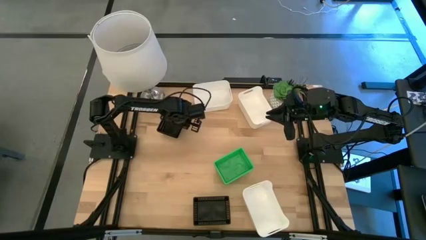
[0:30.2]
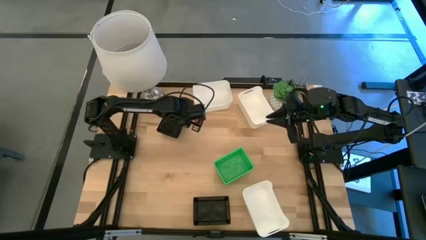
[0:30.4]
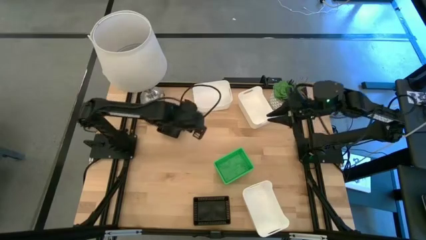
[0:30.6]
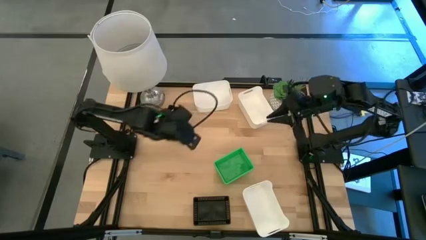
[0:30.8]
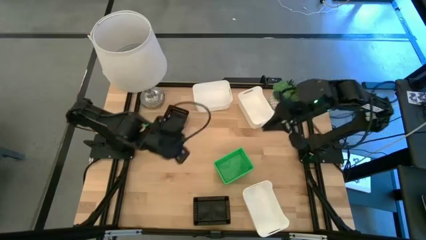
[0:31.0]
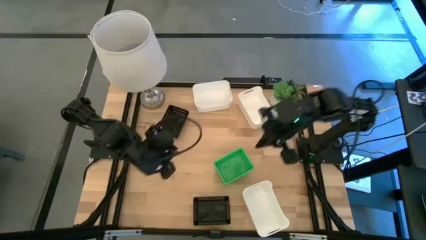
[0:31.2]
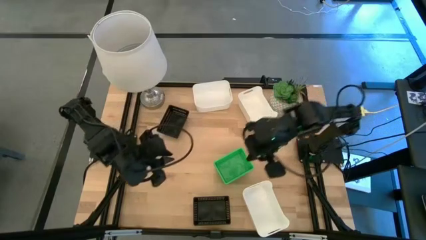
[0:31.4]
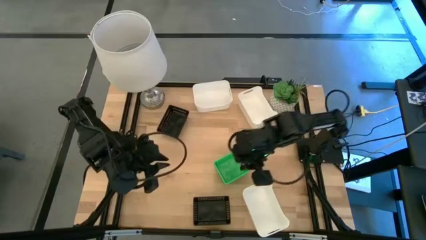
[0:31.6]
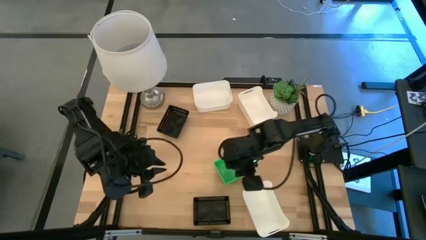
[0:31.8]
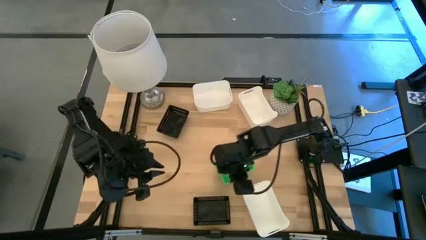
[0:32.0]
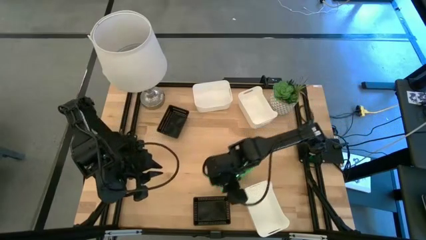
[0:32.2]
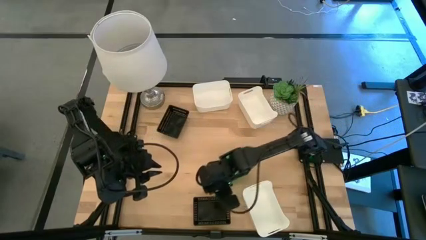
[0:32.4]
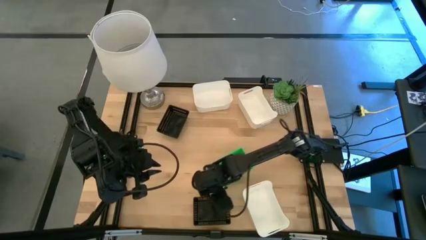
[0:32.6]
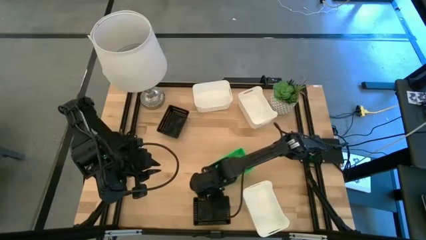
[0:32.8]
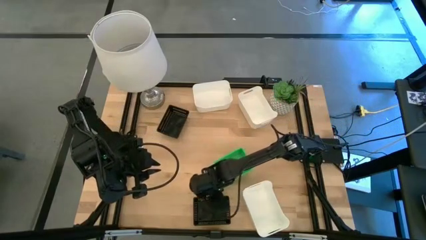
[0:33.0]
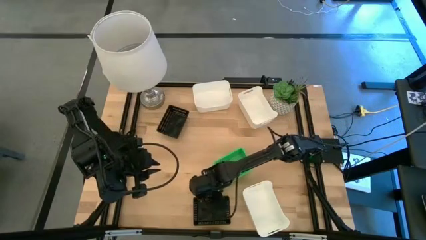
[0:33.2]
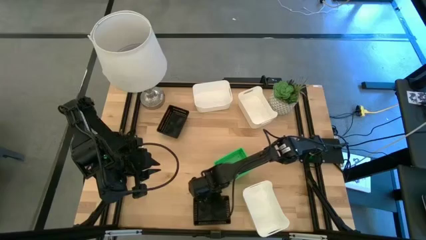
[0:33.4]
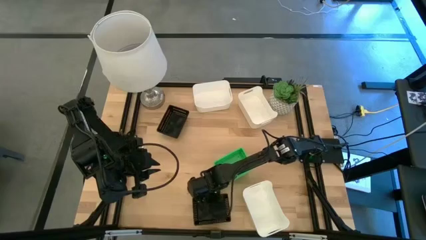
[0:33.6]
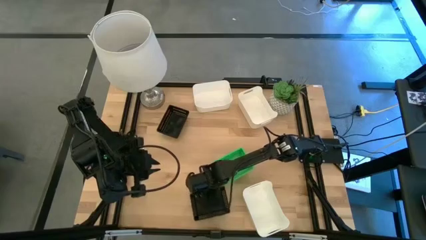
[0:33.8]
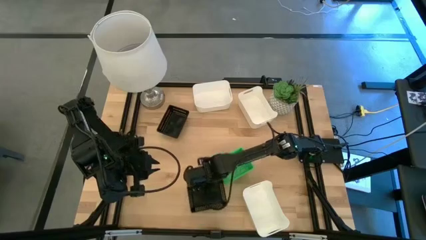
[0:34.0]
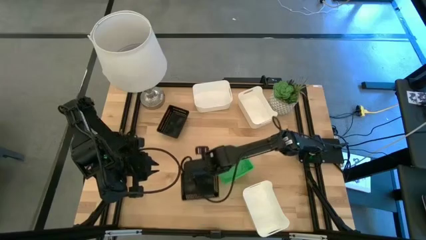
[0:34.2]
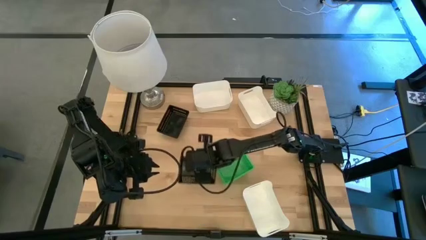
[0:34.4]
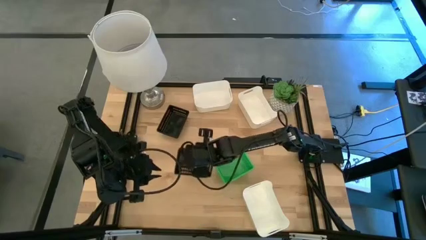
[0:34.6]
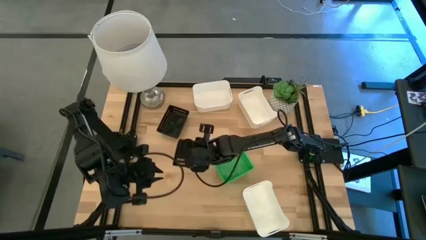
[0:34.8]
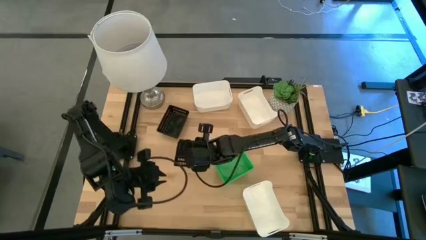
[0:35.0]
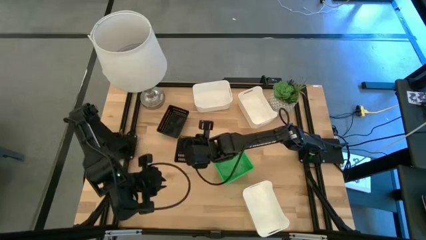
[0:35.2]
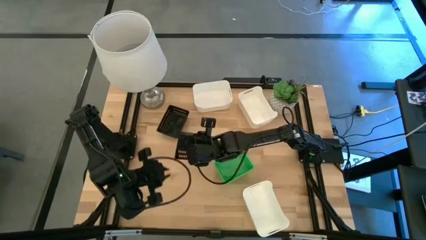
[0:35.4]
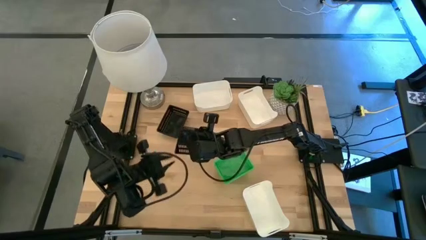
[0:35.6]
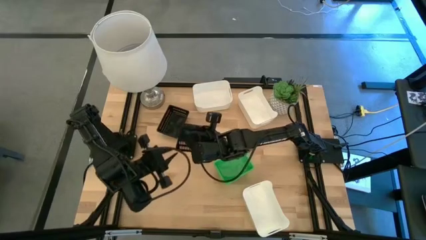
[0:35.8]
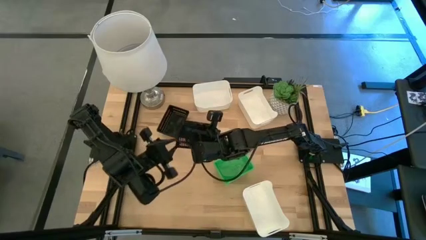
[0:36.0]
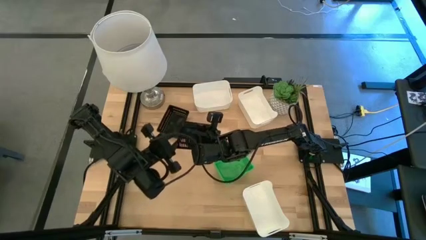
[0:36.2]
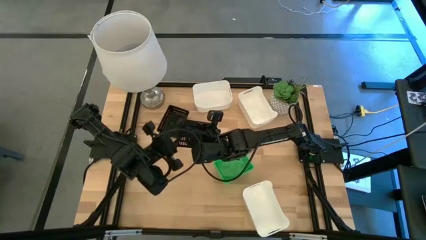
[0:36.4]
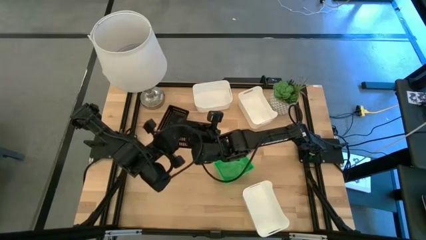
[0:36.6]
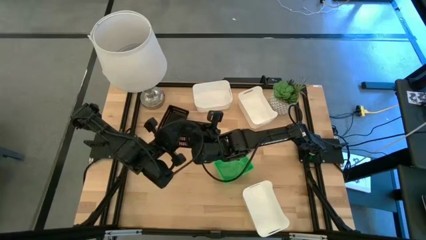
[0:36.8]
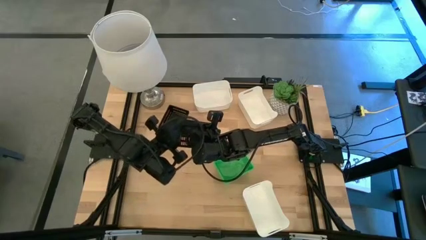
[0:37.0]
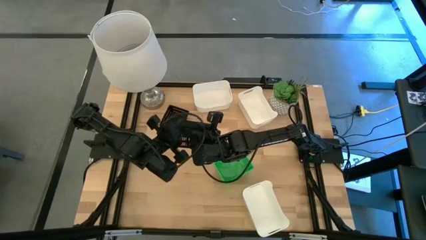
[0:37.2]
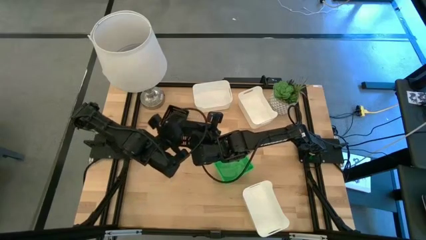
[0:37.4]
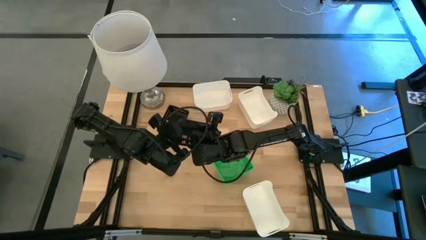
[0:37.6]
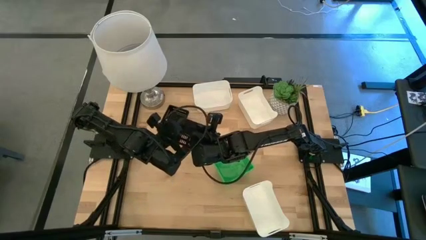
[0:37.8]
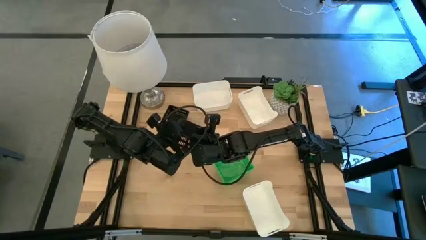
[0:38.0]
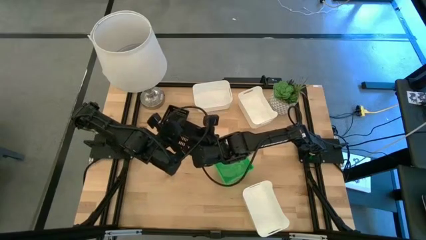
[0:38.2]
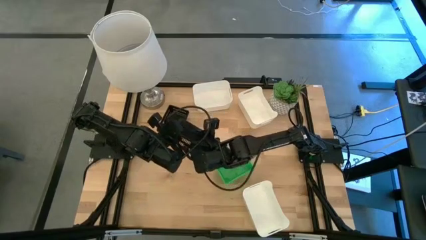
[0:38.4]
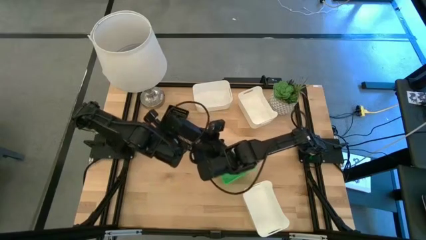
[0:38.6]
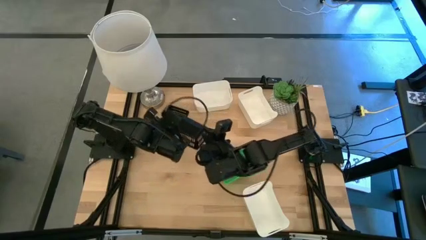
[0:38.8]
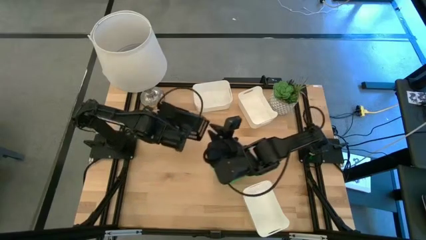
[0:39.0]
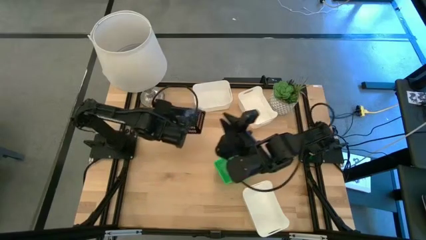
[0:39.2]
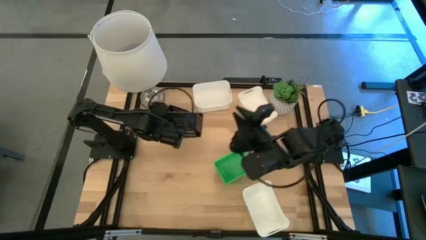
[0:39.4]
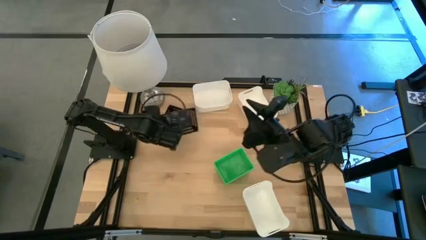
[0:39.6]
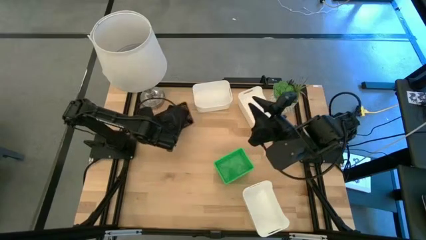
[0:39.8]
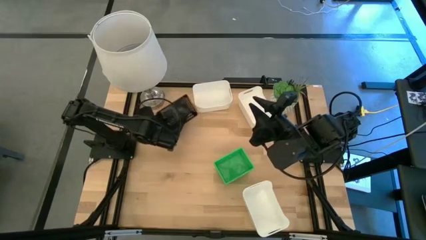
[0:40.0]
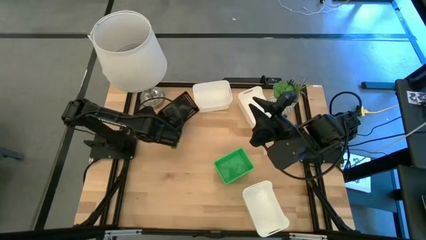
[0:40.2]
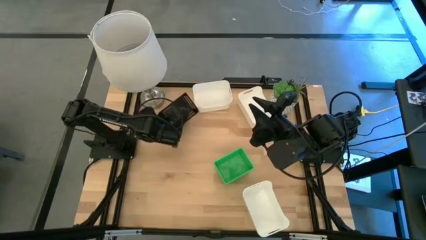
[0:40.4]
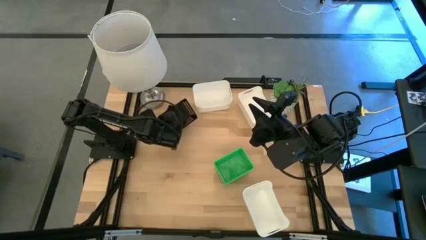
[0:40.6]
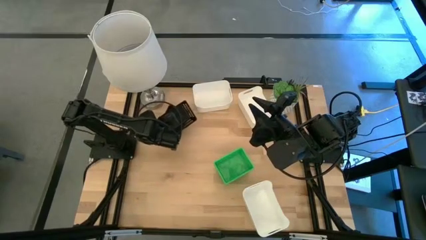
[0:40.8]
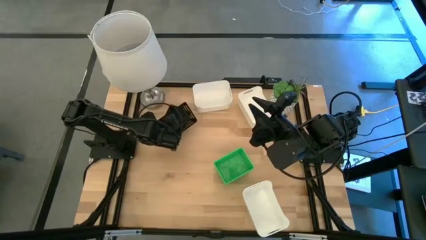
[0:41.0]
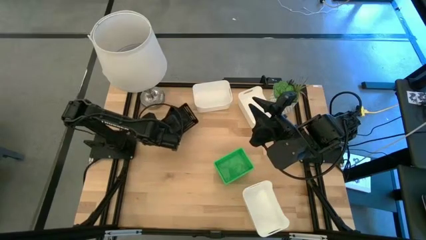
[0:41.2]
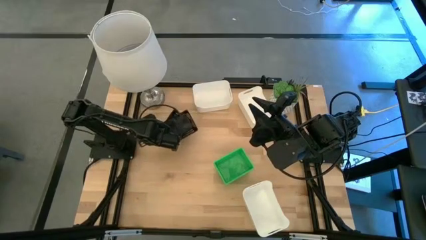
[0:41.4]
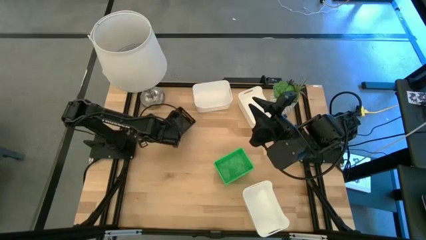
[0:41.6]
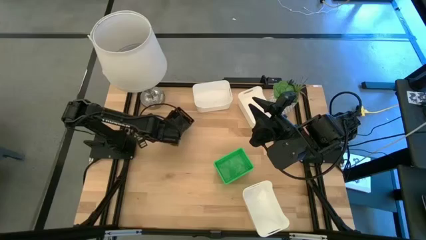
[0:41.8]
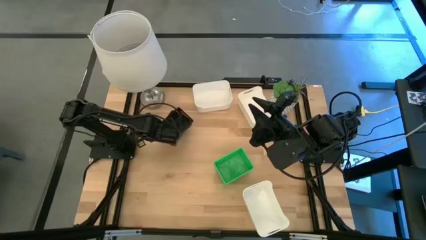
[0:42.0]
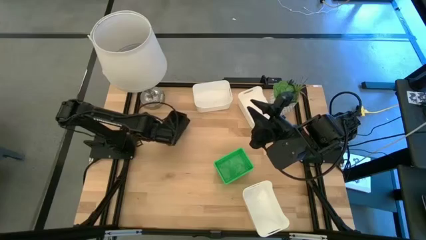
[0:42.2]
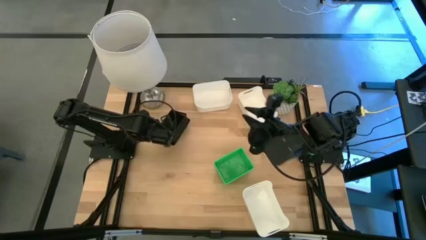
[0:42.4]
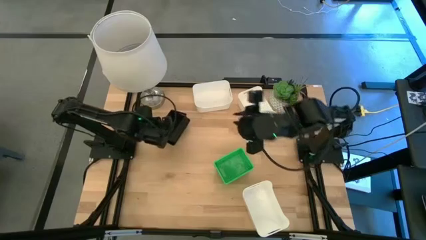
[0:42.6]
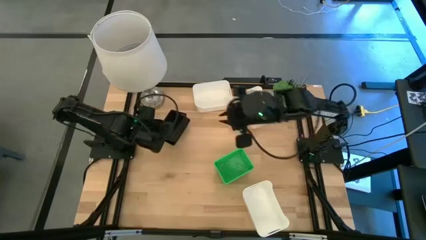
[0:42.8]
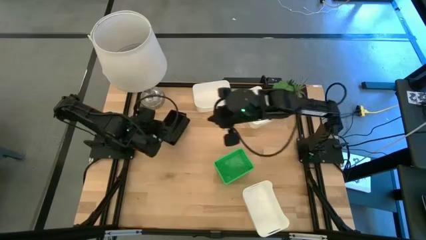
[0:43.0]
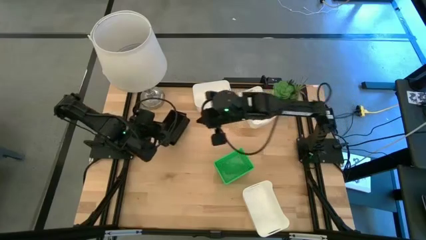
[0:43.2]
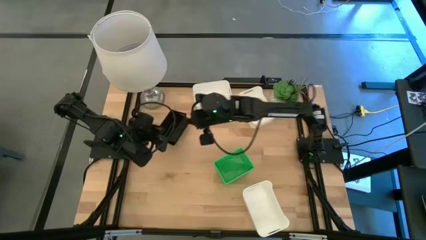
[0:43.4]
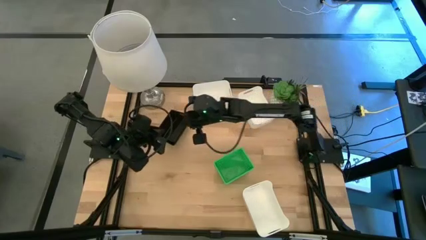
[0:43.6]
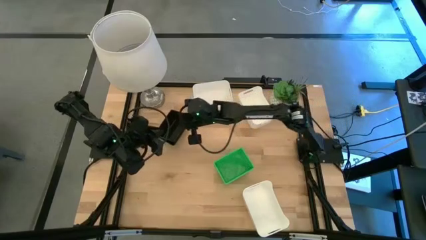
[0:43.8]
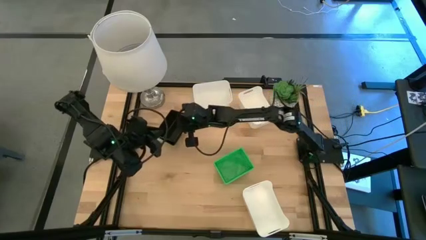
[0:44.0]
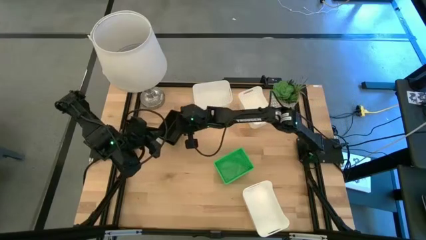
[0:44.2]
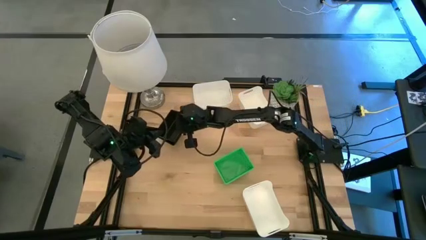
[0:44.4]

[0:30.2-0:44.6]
Stack the bottom black bin on the top black bins
